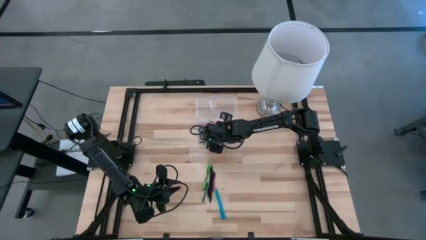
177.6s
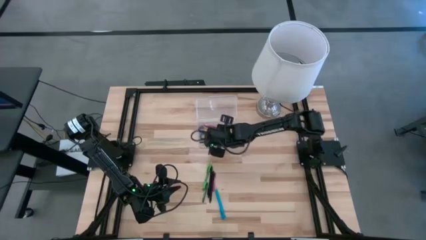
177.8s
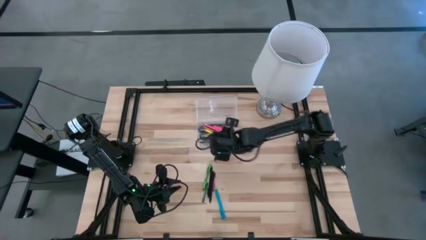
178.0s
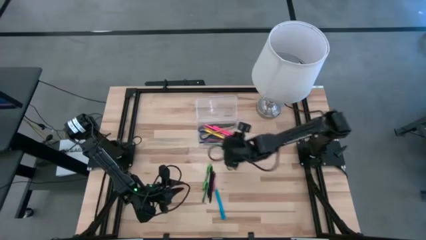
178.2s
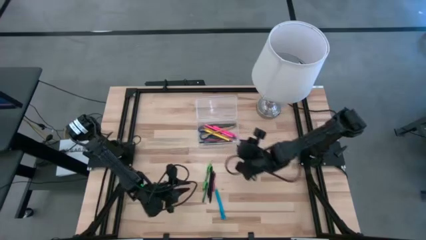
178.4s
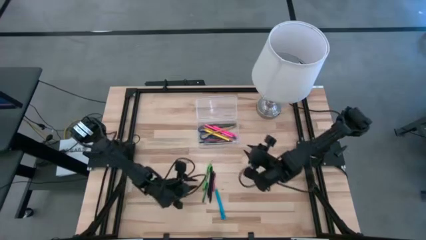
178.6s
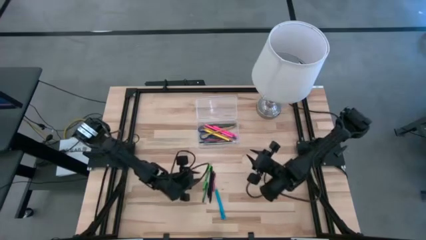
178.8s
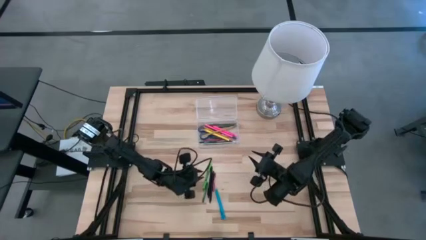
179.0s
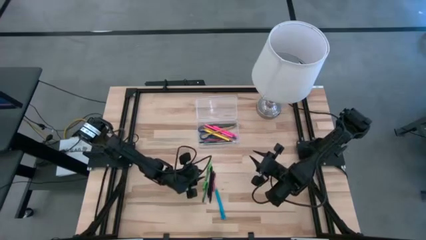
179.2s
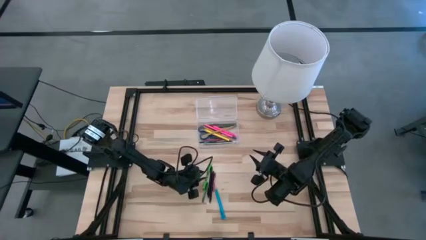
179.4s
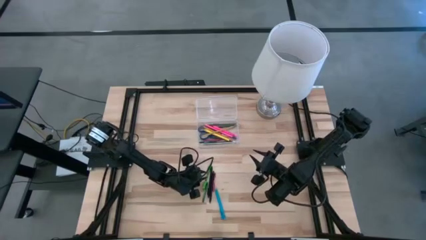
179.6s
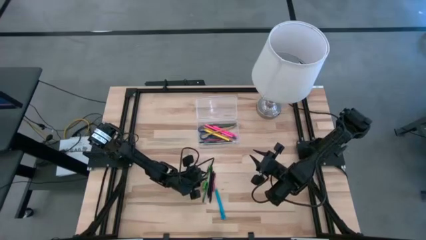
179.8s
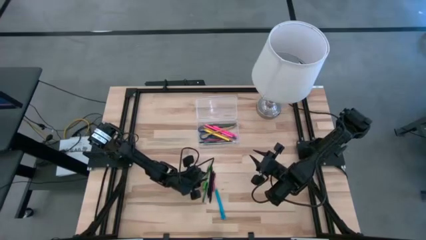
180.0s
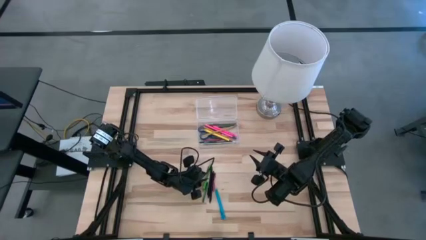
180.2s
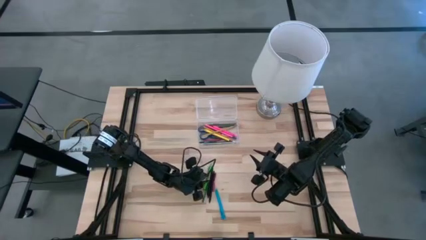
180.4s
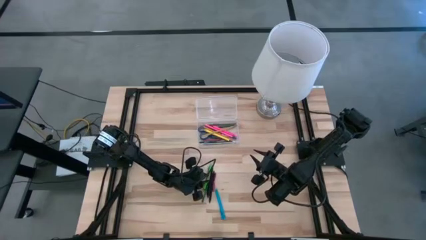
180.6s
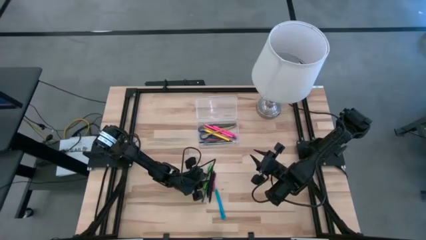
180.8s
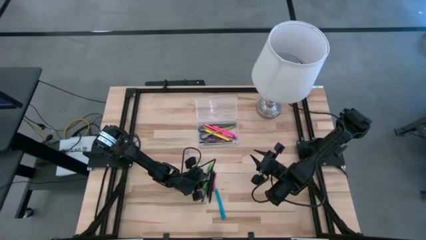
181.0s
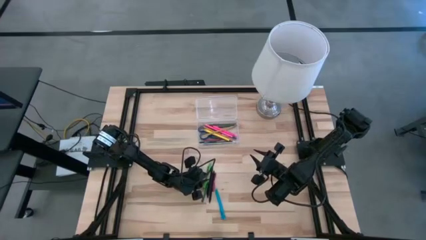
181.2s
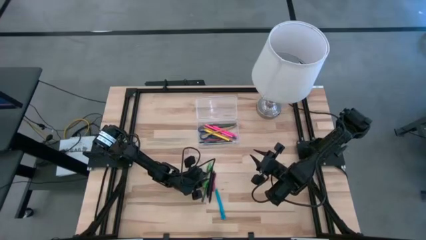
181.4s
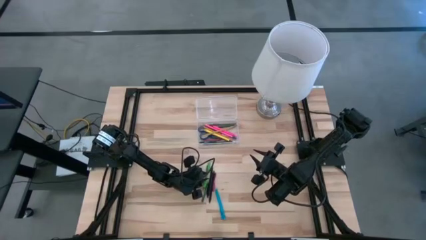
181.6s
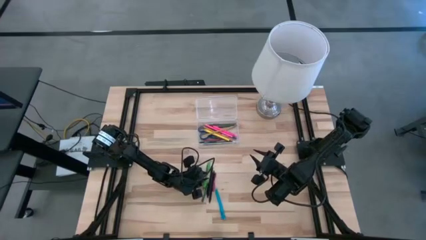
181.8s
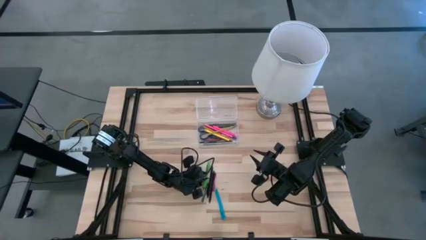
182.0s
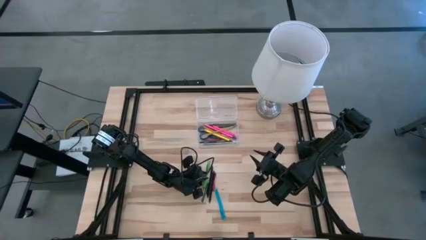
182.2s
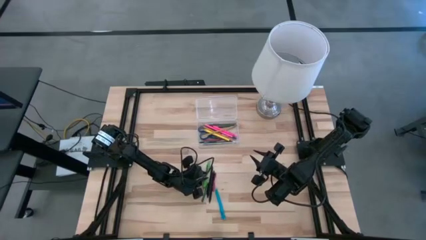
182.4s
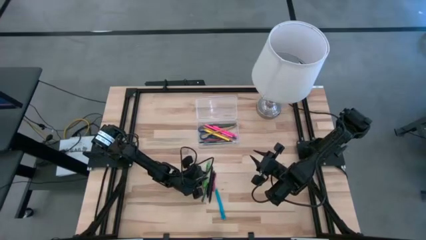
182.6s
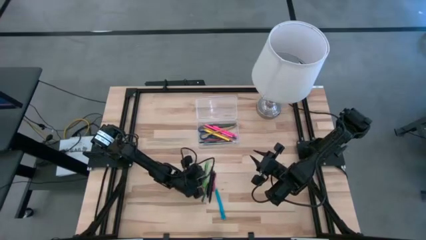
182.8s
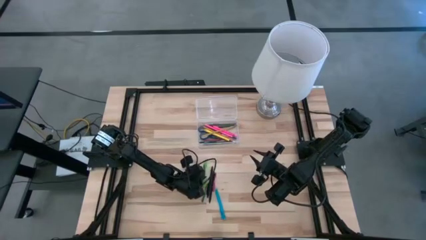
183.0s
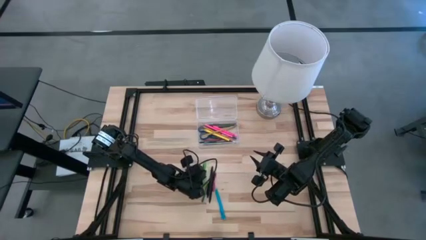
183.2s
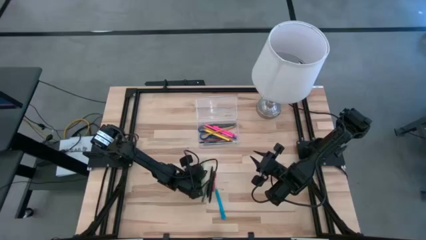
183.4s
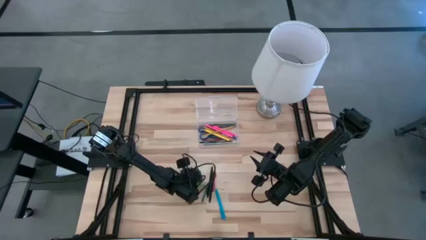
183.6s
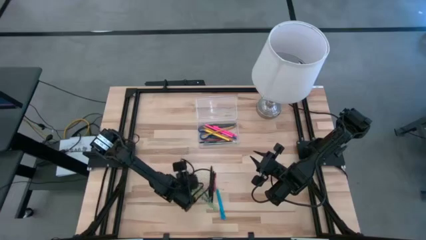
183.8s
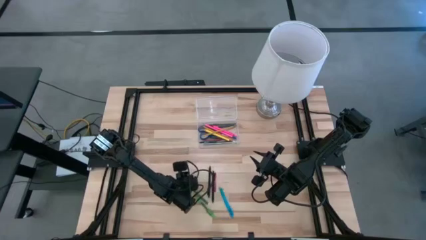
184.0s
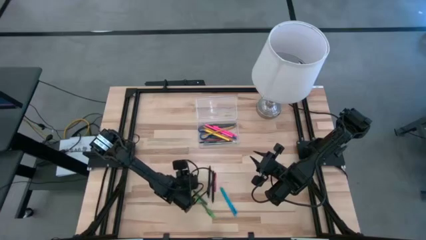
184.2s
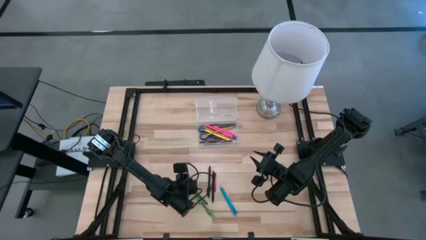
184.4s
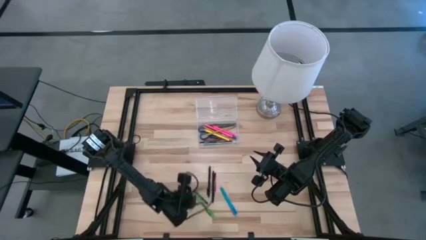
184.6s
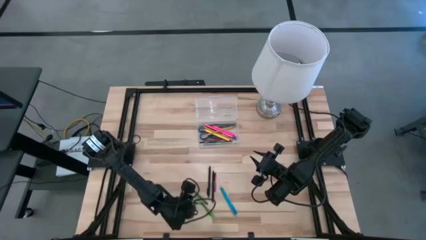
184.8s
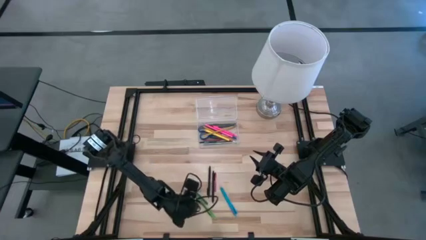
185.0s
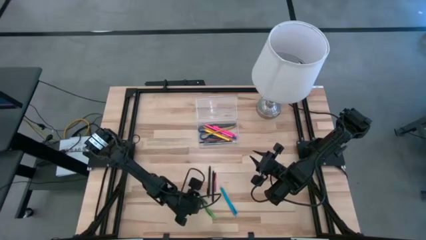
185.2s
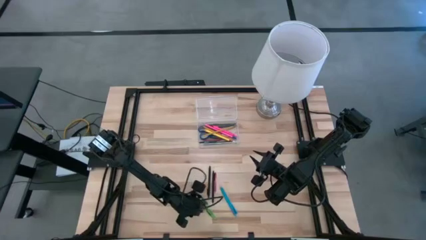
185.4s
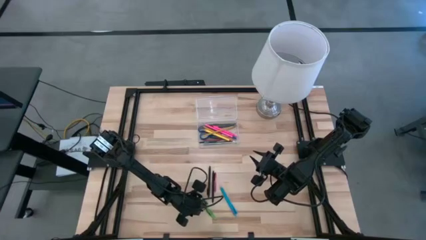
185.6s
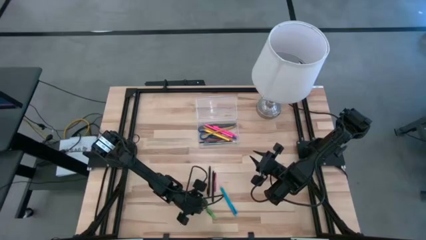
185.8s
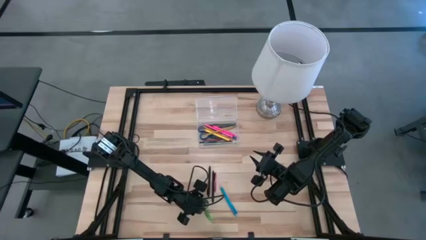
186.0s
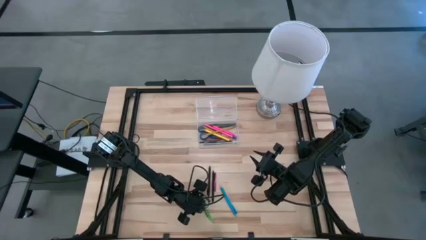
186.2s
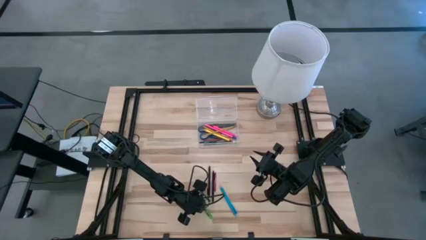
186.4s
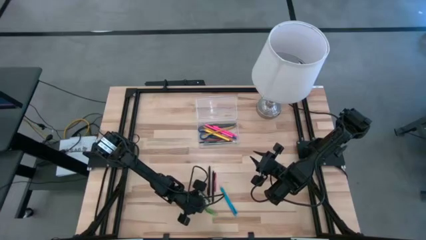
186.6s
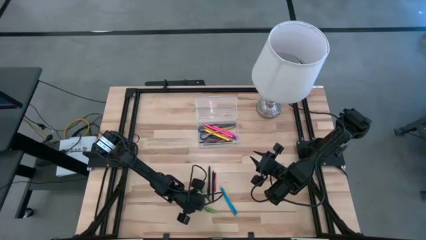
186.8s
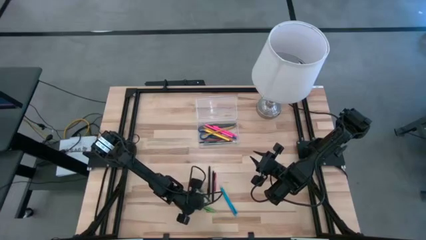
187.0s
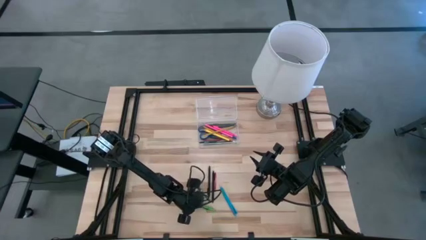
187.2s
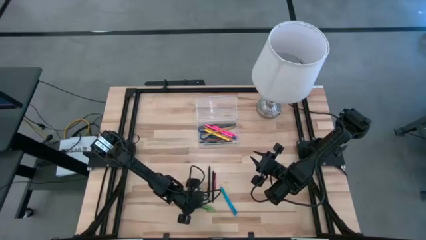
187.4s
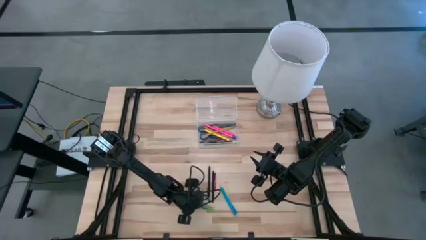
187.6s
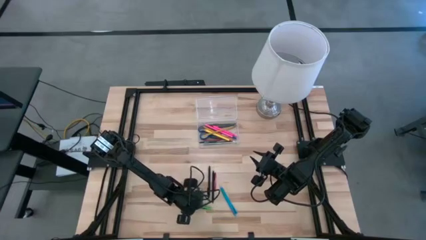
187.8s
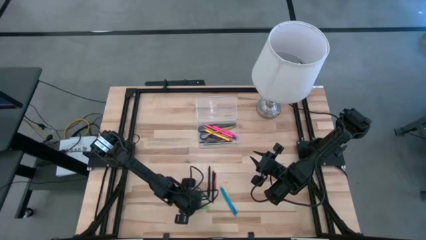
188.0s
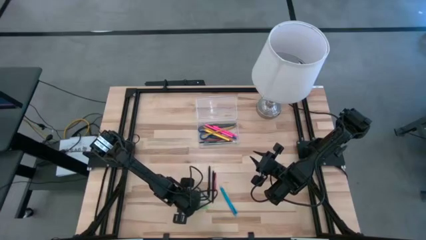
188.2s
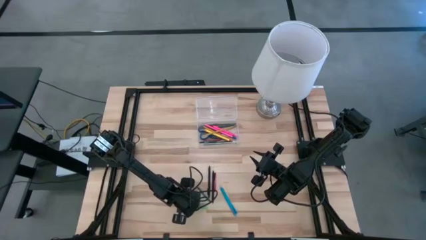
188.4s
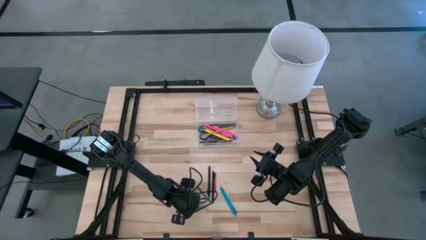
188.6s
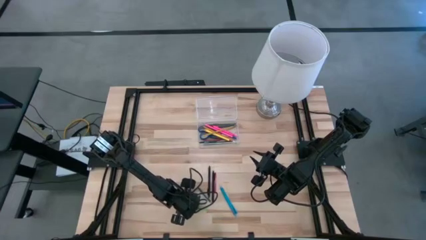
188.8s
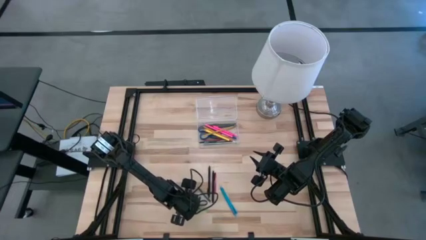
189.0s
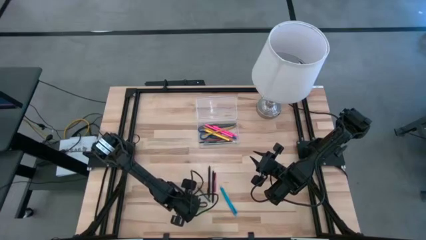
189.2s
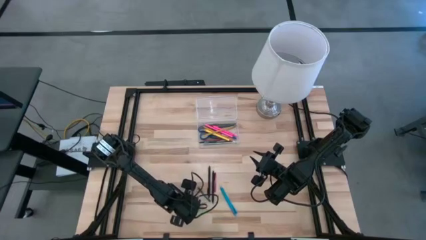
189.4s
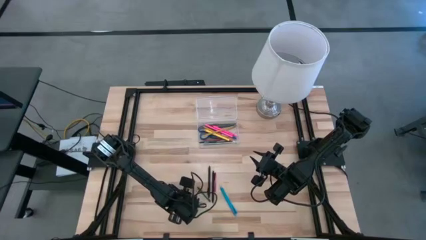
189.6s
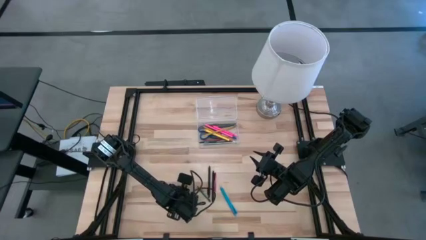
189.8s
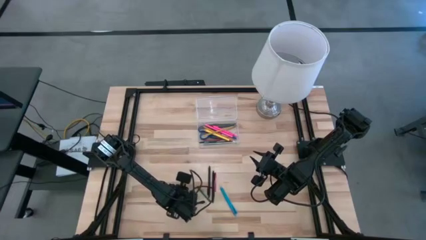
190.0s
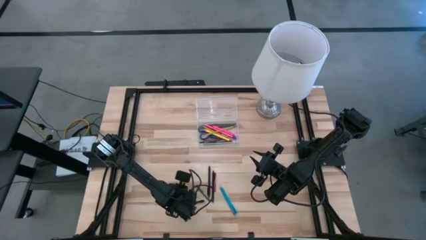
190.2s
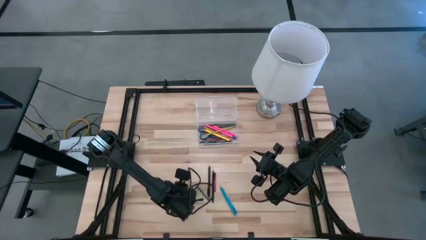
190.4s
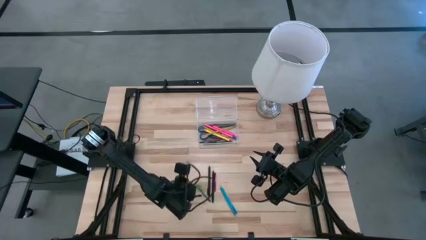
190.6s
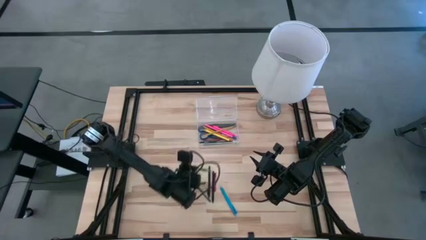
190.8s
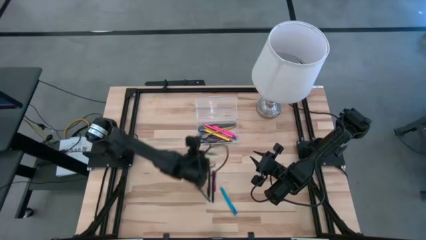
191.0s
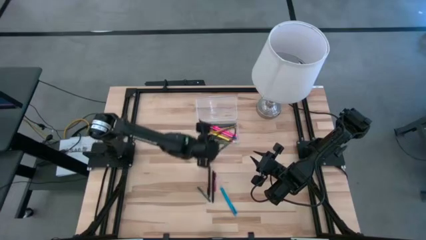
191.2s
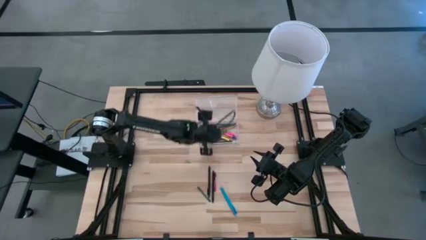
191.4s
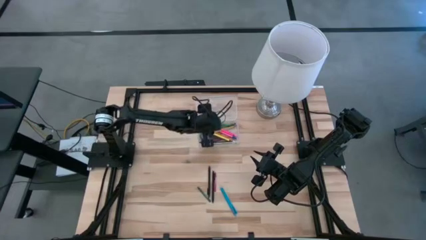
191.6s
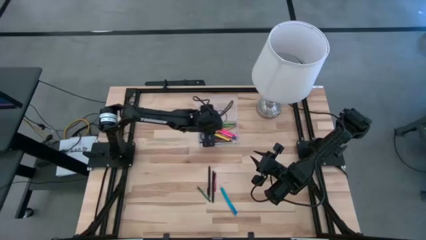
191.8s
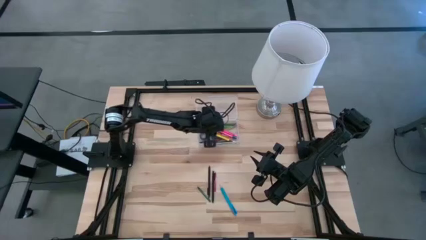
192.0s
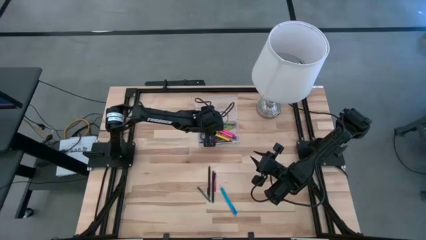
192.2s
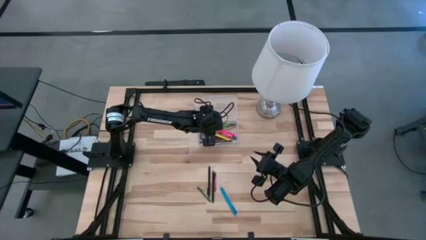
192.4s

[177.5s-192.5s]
Task: Pick & place school supplies into a supply box
Put the light green pen into the supply box
